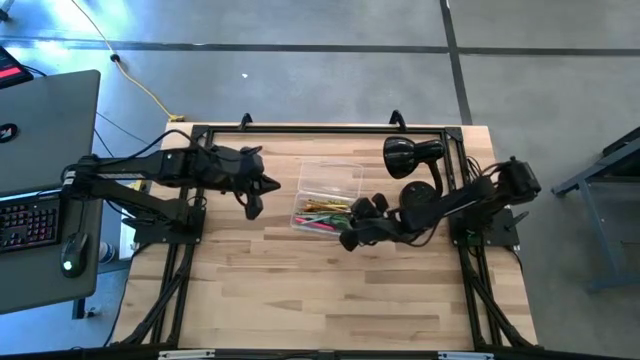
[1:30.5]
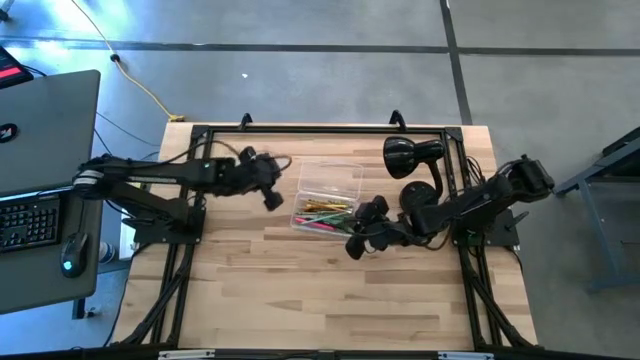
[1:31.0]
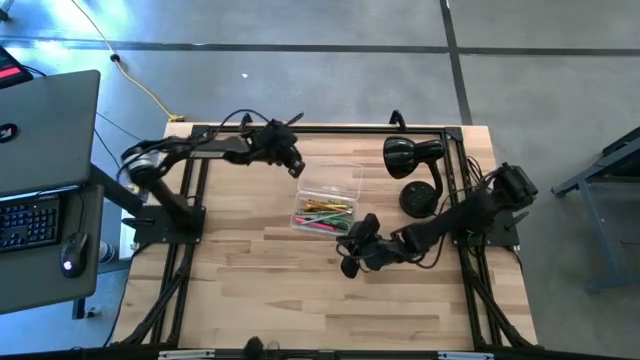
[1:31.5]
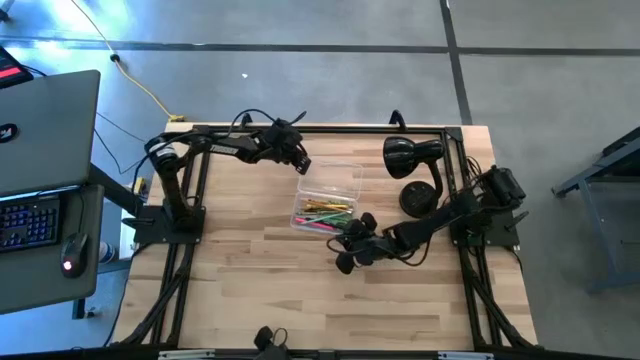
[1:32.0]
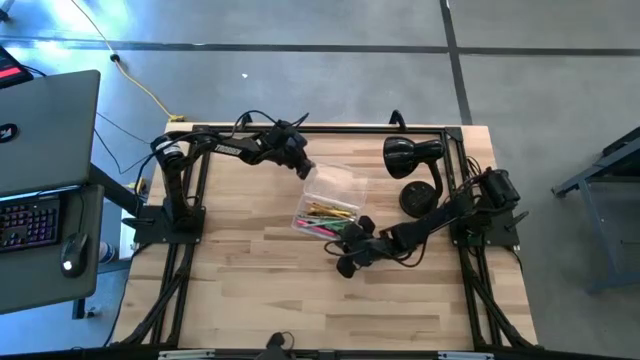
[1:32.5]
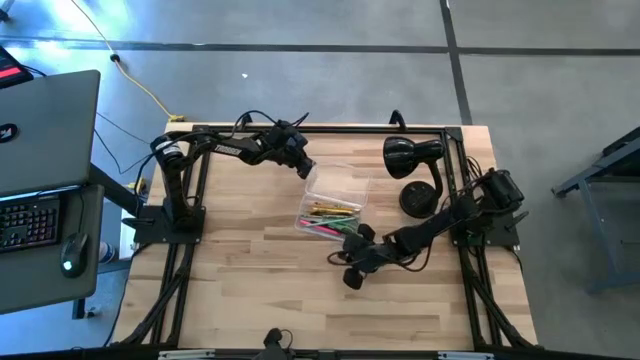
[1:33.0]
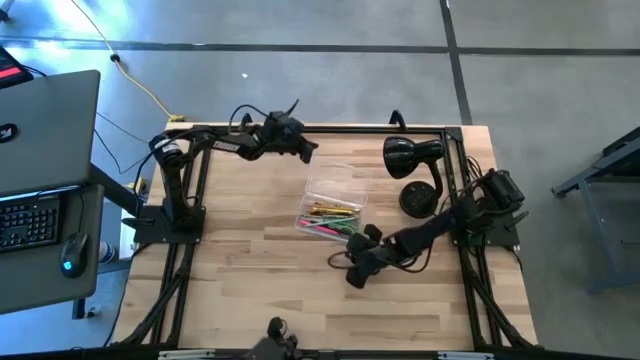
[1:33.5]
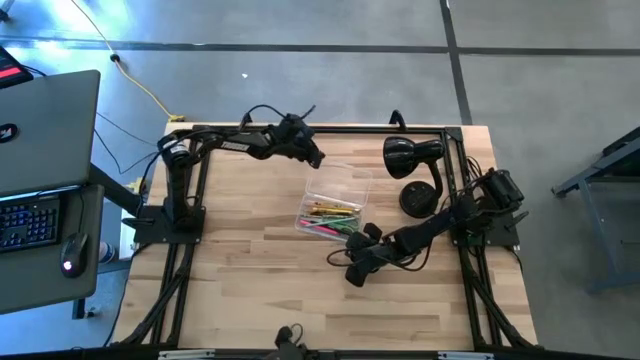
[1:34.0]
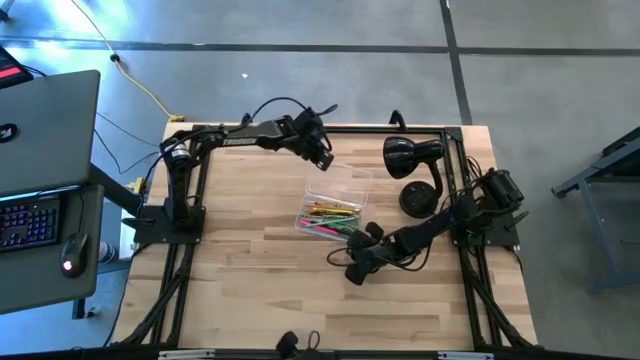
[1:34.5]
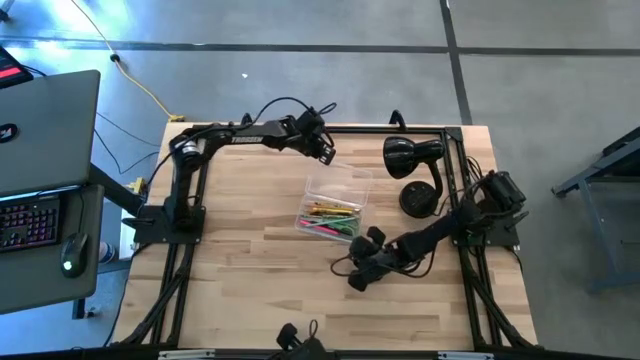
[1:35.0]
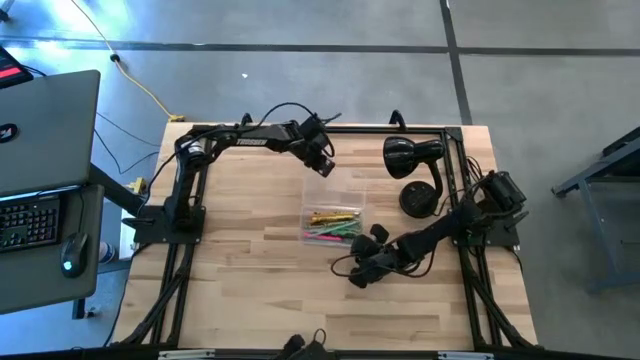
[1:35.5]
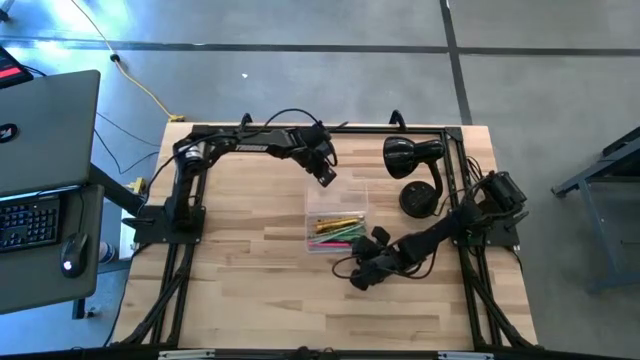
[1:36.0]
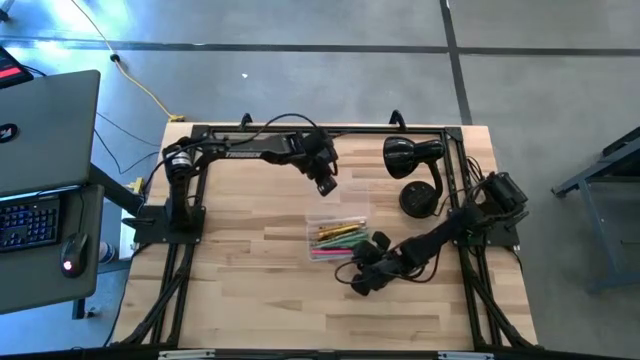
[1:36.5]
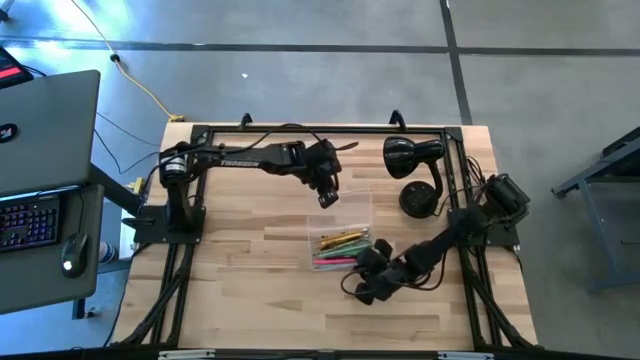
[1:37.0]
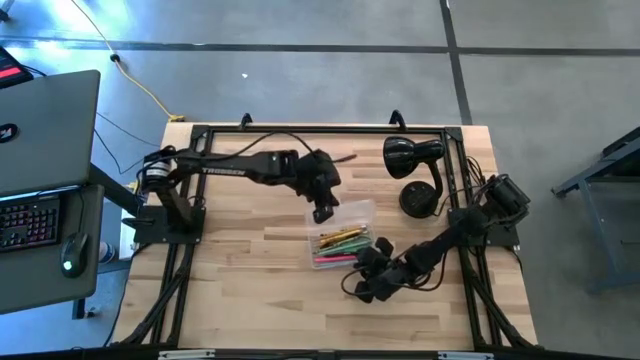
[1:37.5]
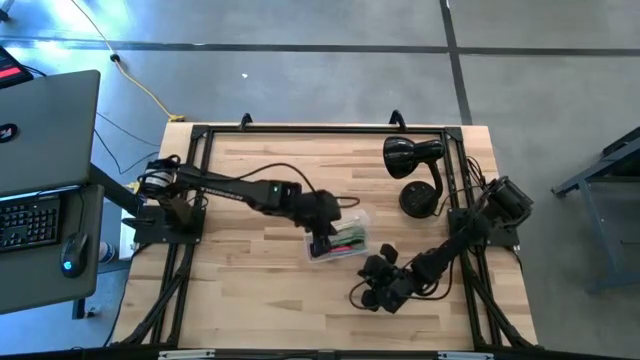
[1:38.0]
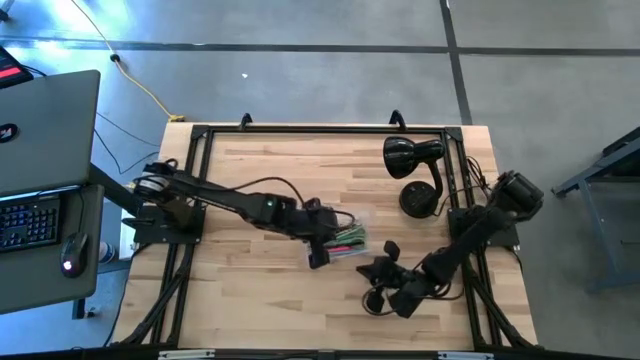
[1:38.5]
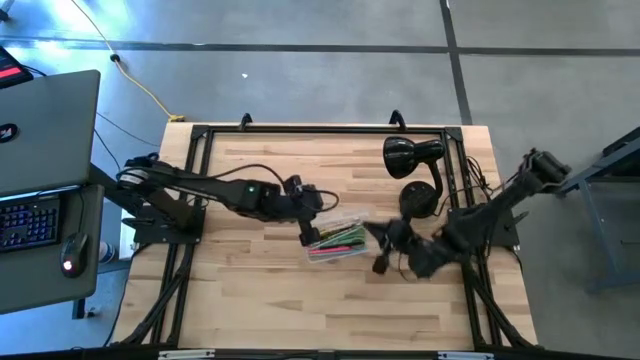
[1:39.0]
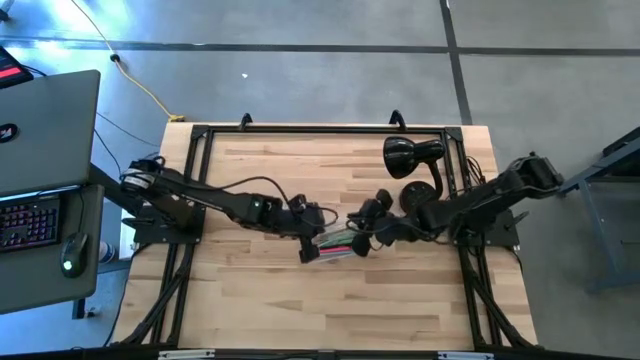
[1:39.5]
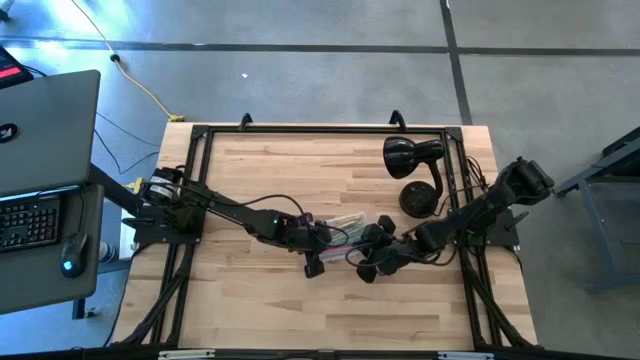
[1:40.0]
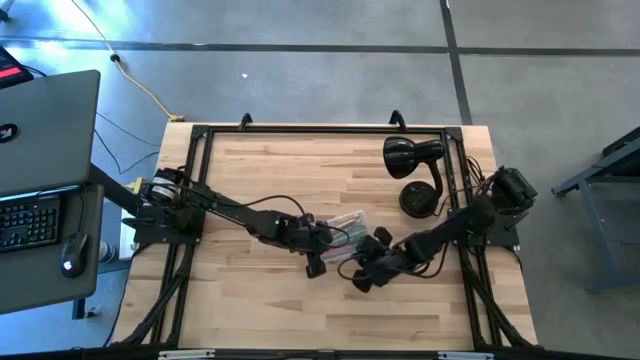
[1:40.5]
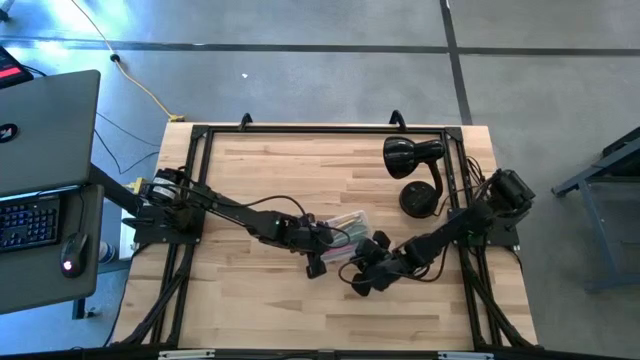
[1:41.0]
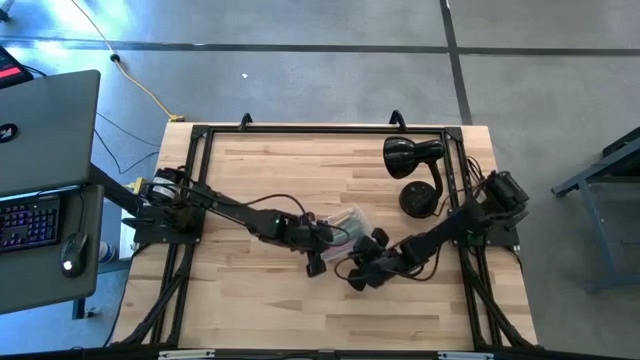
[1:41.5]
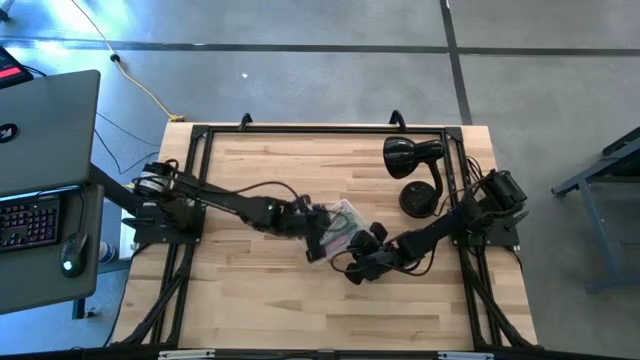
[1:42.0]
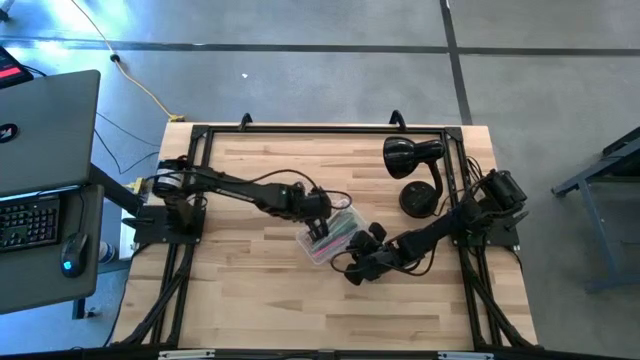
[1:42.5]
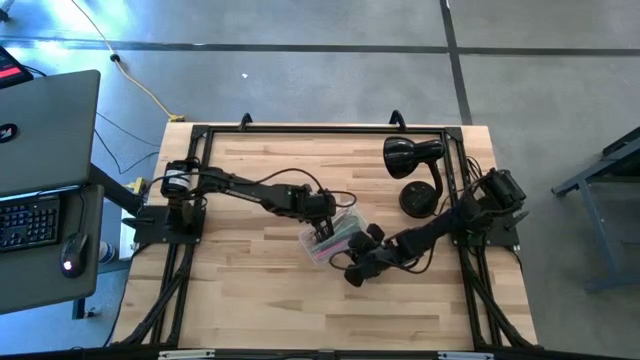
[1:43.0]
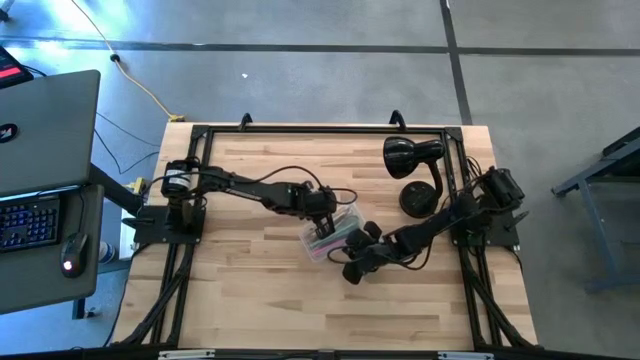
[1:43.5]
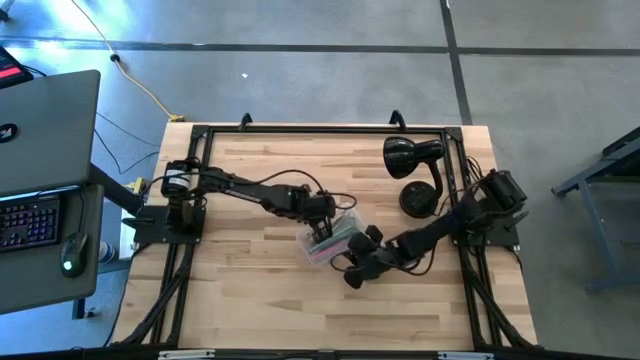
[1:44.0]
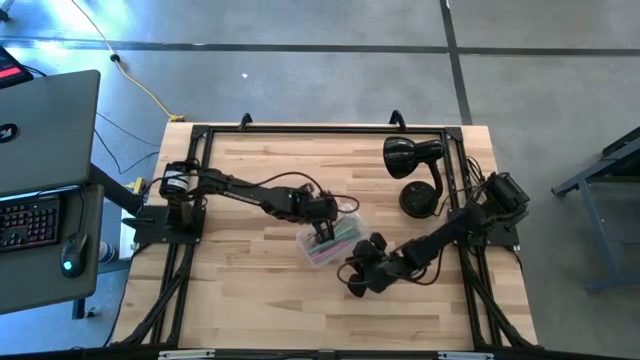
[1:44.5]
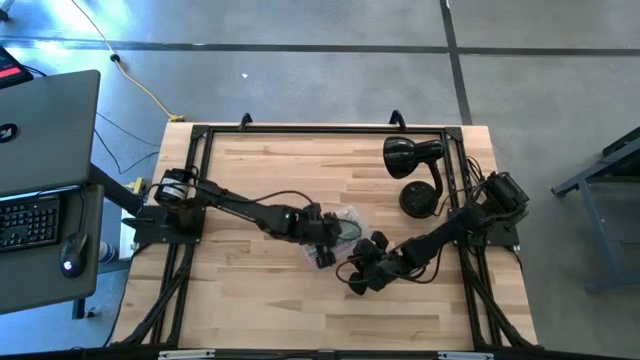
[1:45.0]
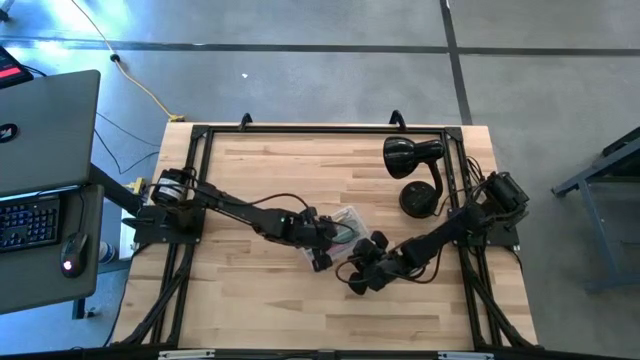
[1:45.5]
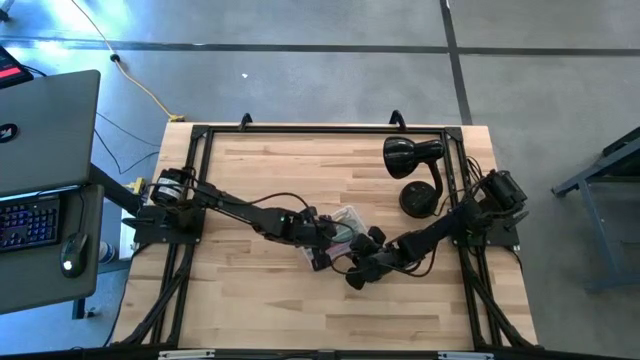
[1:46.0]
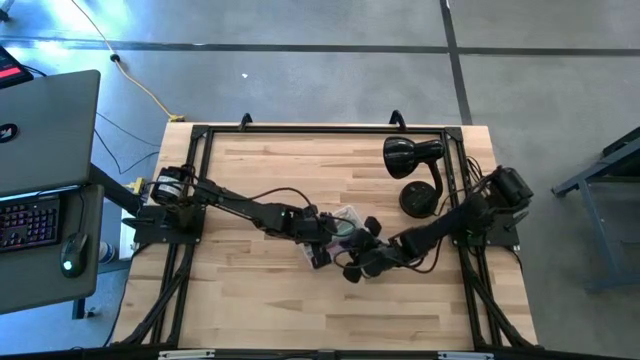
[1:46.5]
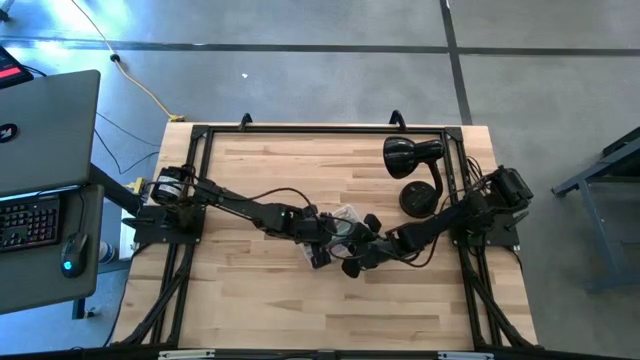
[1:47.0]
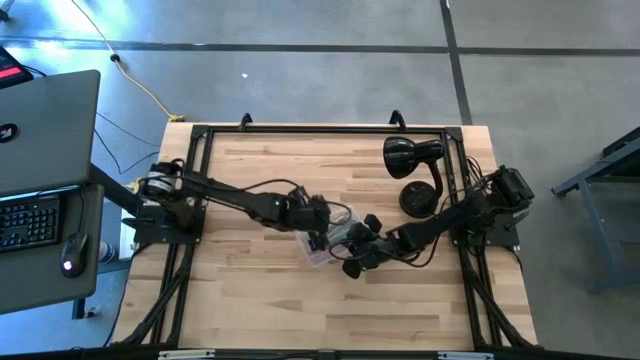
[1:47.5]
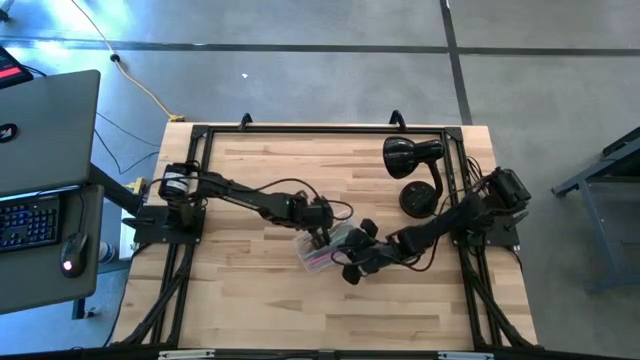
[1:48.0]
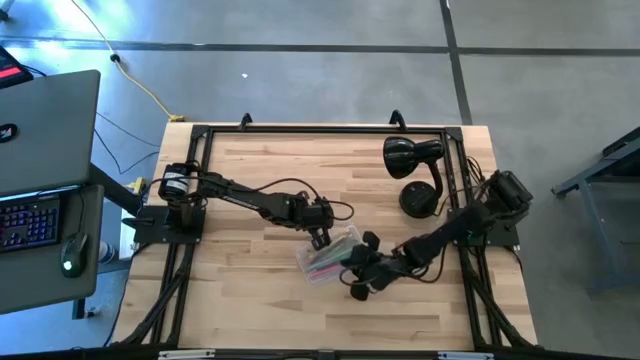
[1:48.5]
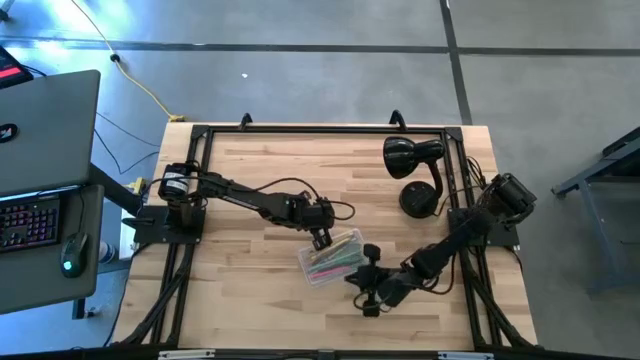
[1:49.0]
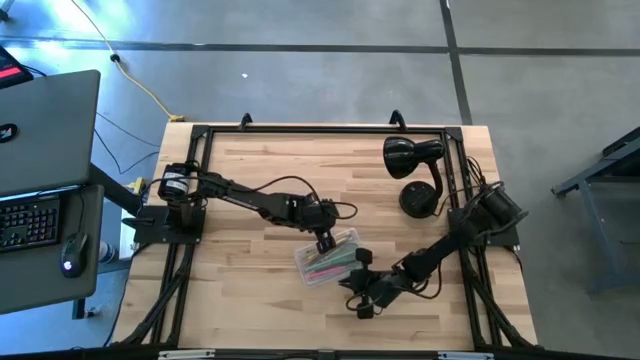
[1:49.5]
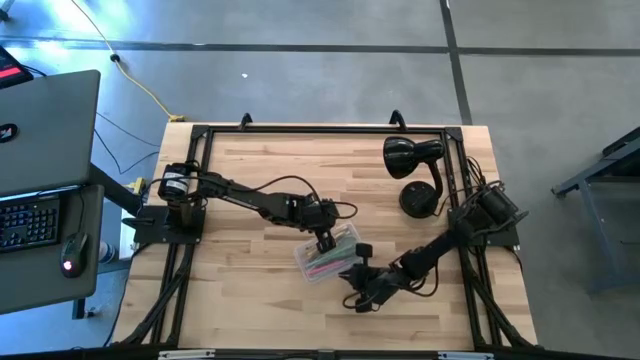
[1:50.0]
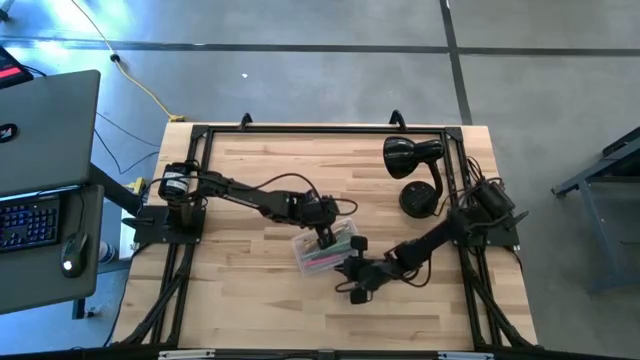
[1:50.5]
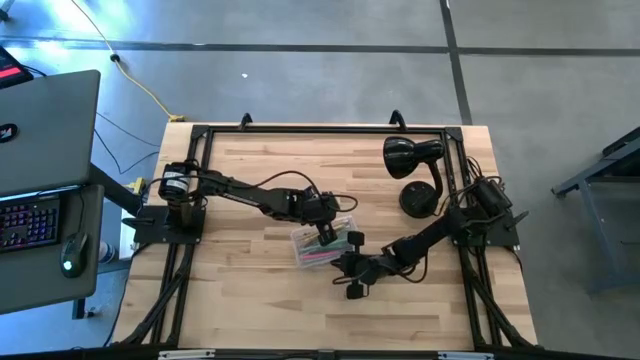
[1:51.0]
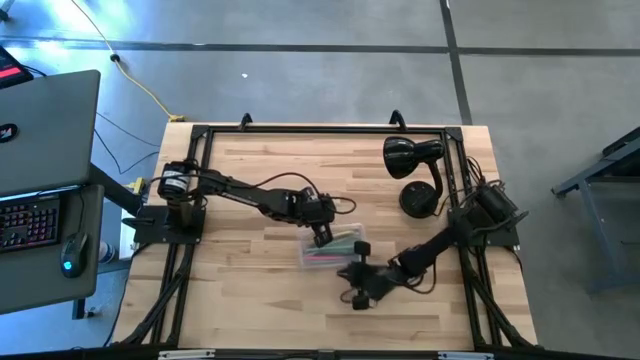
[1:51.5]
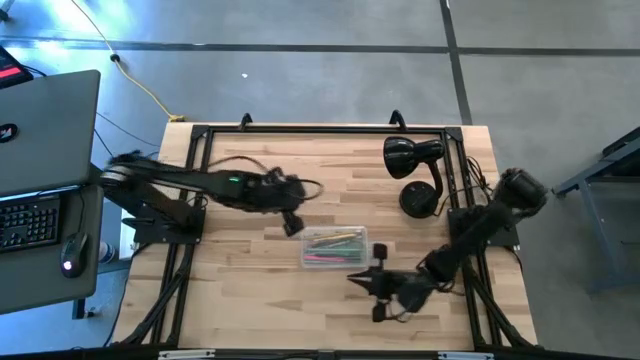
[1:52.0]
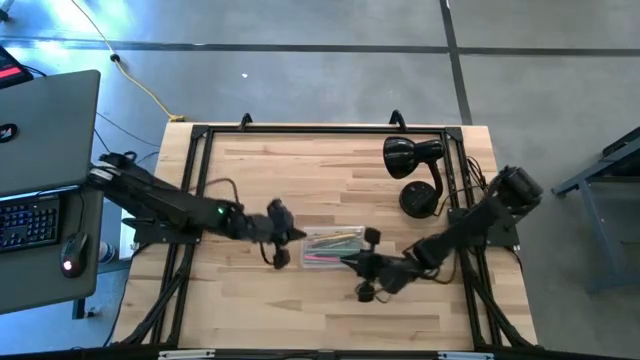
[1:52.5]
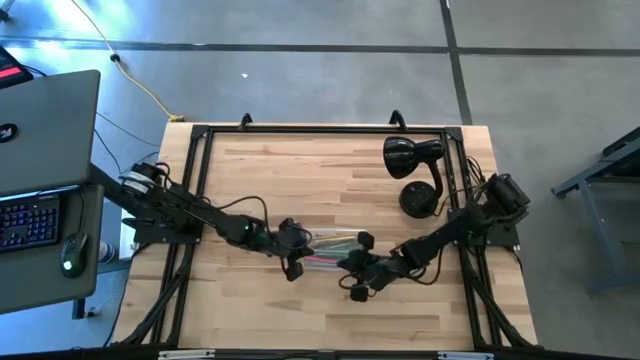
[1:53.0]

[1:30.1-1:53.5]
Task: Pick & place school supplies into a supply box
Close the transparent supply box
